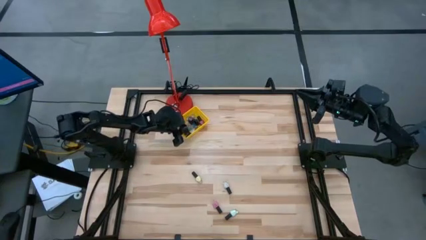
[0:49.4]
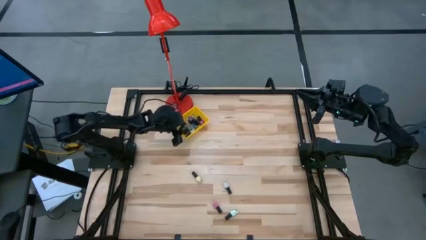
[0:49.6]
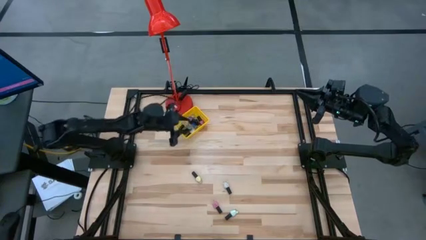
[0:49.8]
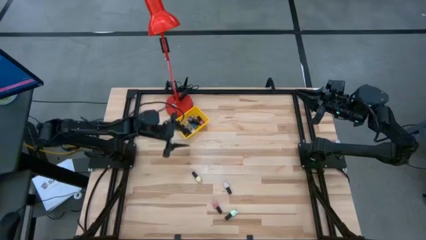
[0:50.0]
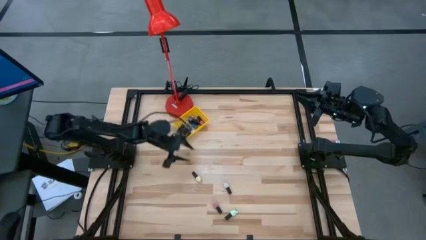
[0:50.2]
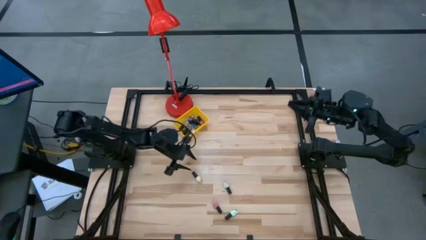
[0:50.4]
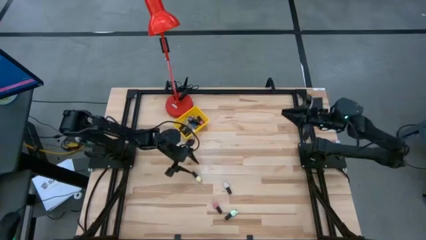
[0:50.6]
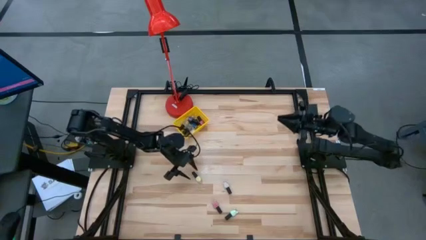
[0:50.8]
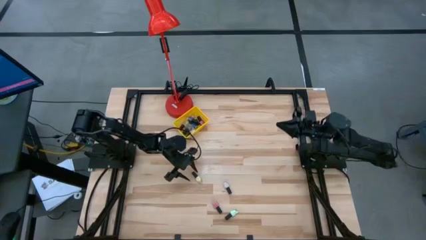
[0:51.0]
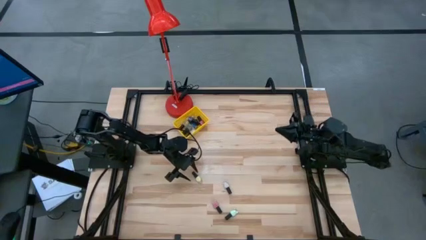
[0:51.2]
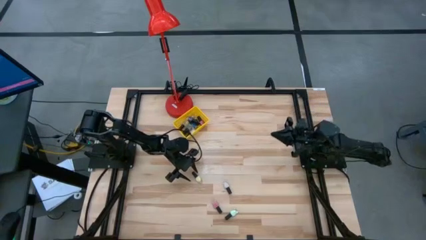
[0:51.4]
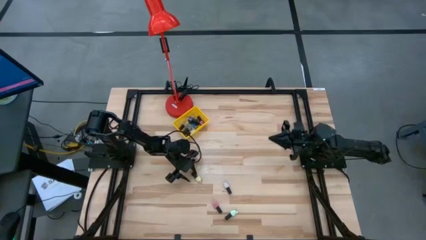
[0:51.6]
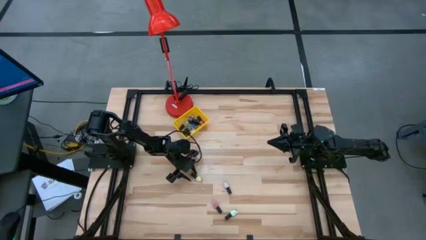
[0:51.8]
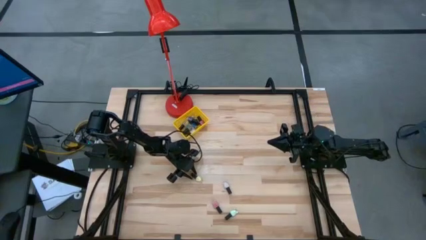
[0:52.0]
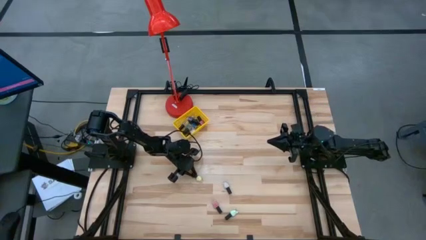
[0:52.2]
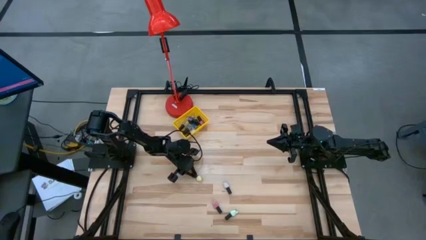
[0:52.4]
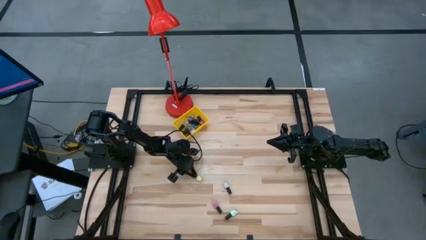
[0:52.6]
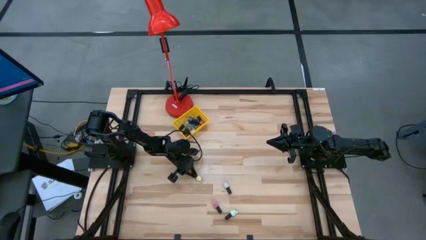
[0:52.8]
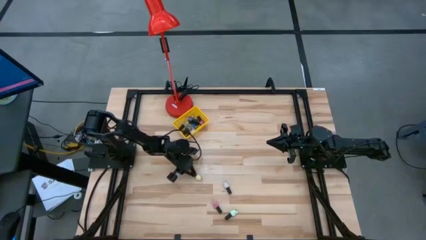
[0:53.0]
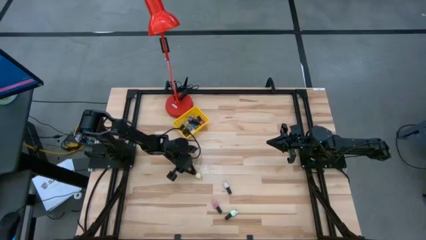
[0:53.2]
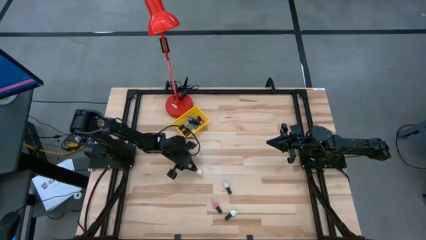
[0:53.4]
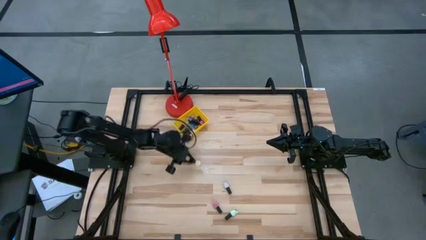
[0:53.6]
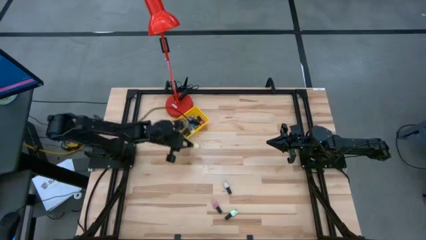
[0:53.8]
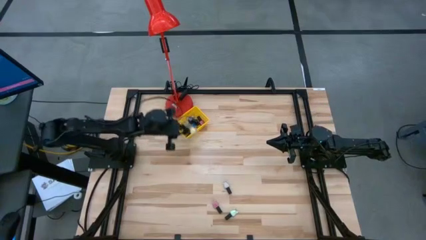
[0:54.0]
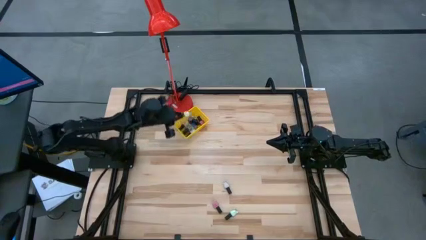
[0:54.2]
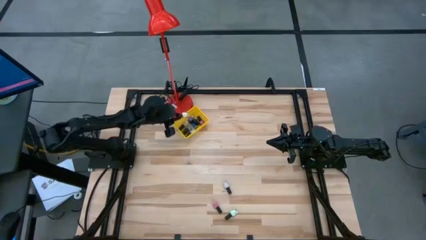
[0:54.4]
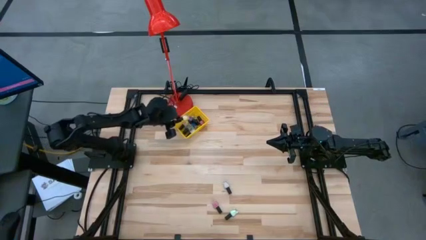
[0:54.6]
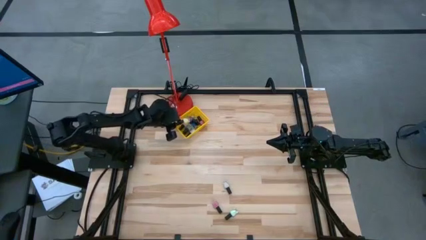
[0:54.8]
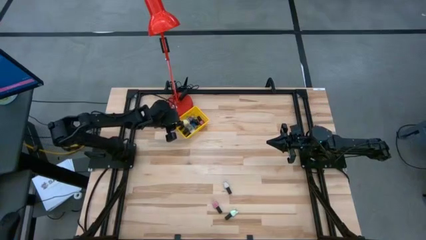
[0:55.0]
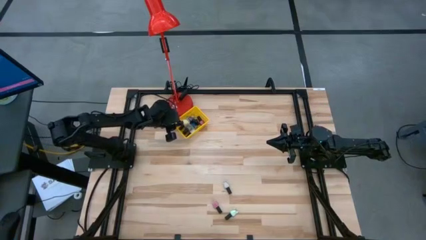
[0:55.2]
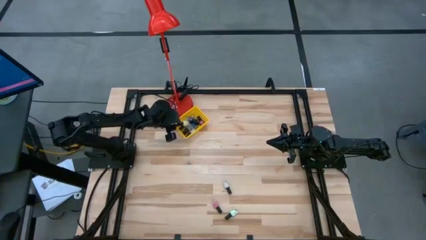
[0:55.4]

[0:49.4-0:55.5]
Task: Pick & Place Nail Polish
Put the yellow nail polish into the yellow basket

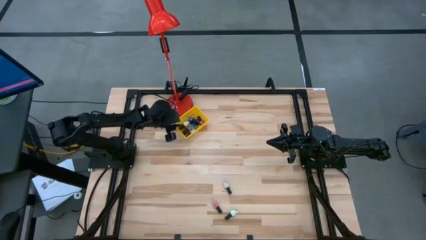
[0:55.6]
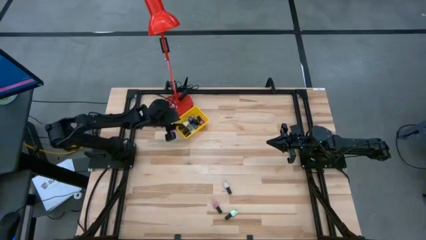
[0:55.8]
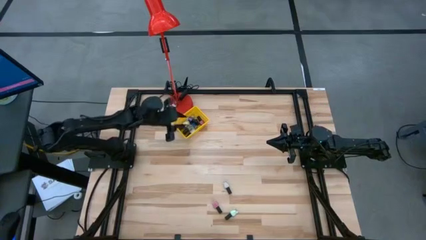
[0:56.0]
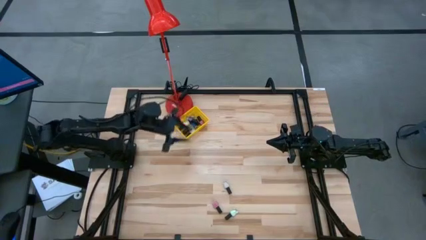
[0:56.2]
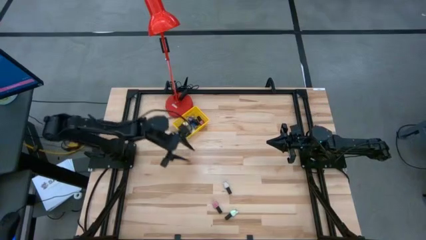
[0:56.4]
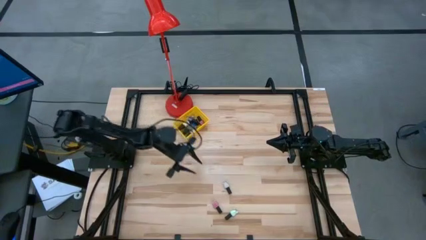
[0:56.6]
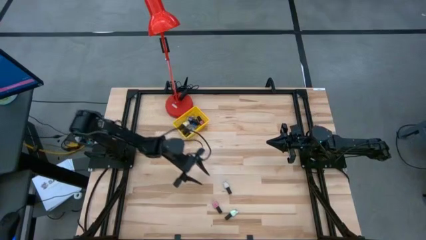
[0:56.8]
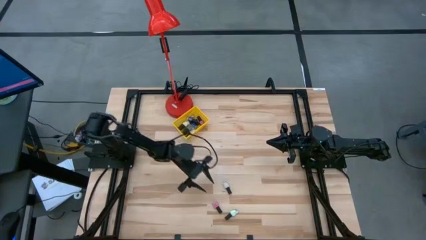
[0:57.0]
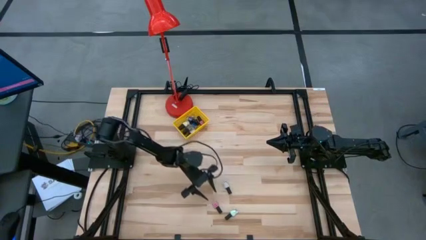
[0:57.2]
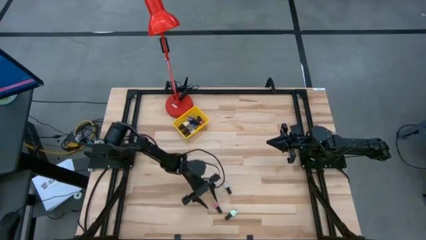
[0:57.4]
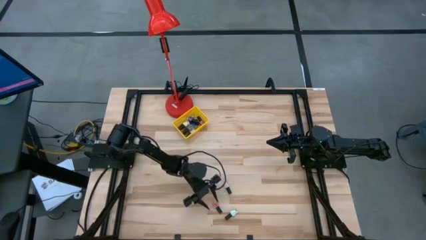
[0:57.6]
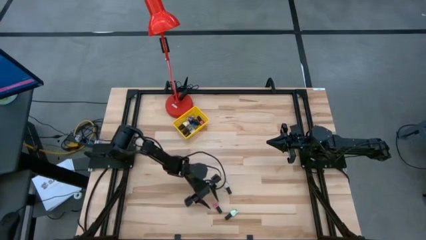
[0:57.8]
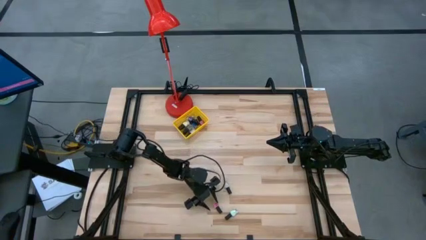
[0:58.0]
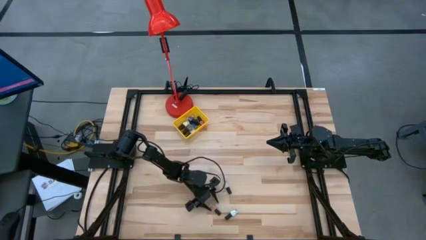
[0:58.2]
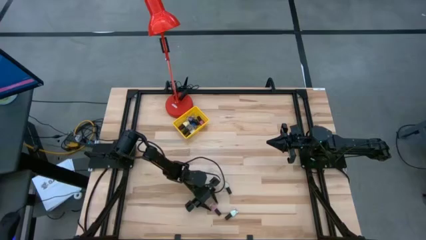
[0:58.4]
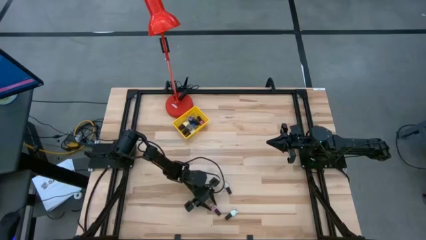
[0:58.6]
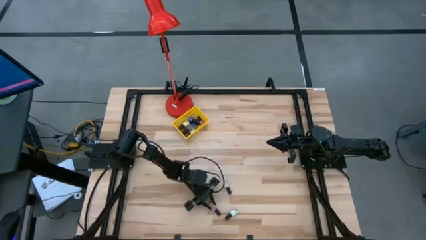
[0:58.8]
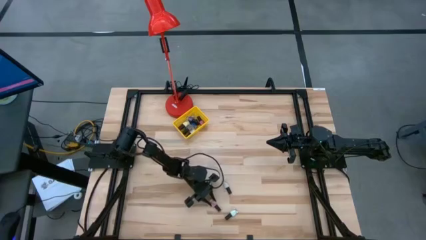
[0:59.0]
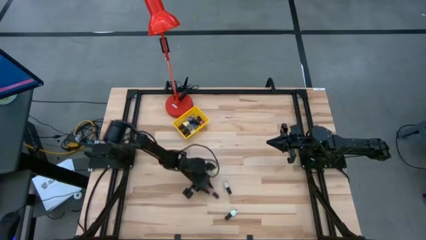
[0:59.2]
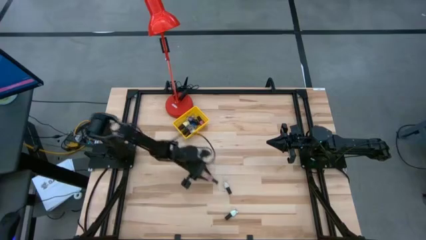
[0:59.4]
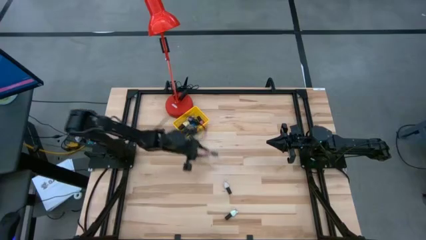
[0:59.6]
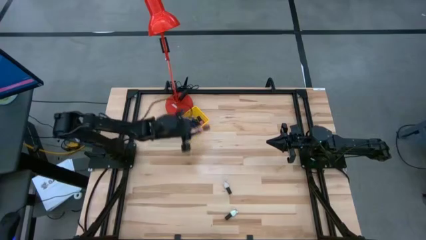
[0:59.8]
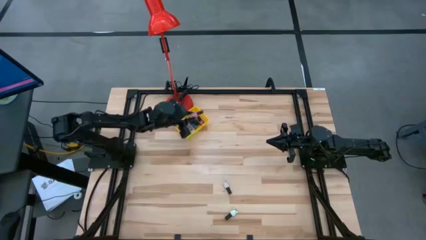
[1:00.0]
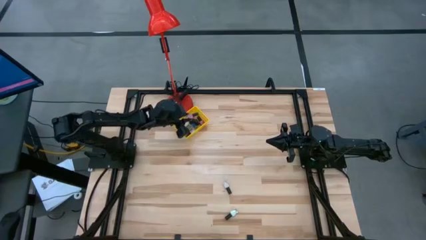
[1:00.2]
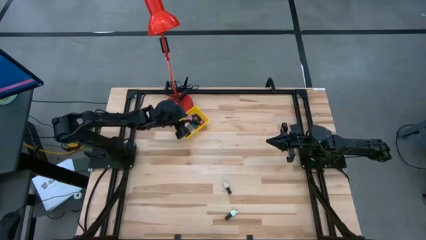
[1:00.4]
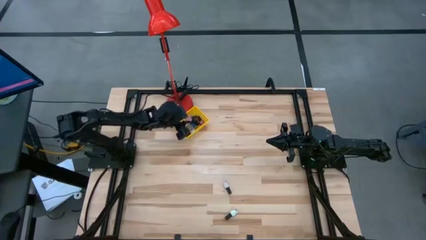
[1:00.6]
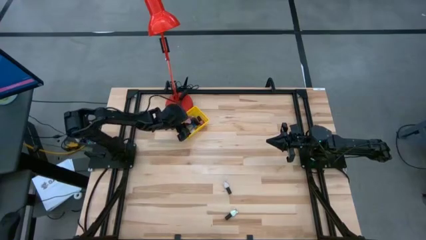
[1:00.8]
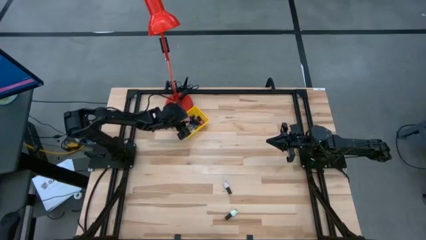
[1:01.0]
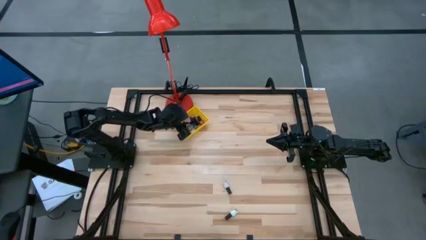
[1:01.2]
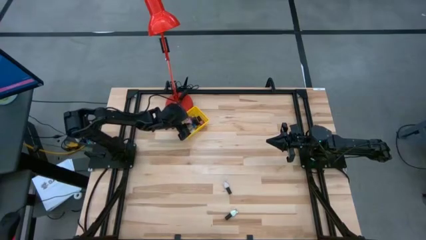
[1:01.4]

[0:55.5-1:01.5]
Put the pink nail polish into the yellow basket

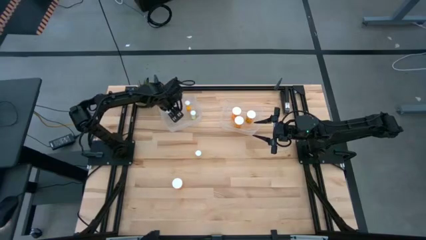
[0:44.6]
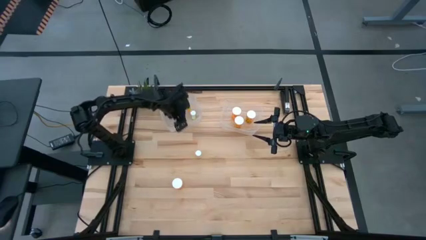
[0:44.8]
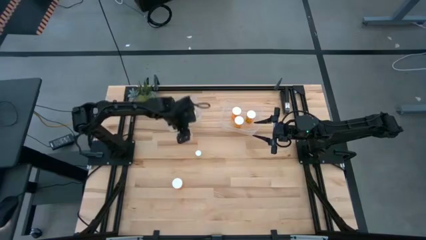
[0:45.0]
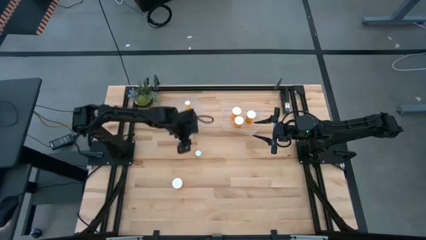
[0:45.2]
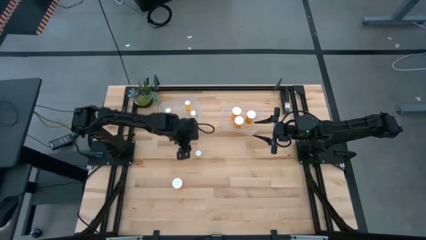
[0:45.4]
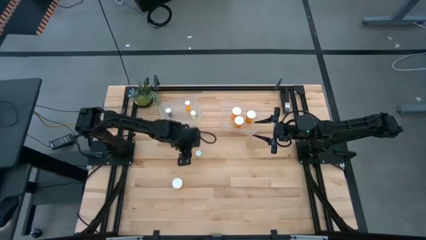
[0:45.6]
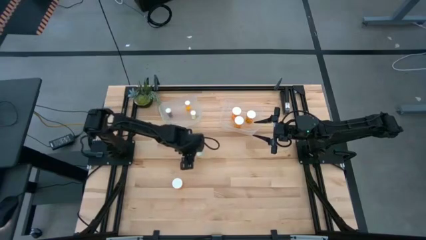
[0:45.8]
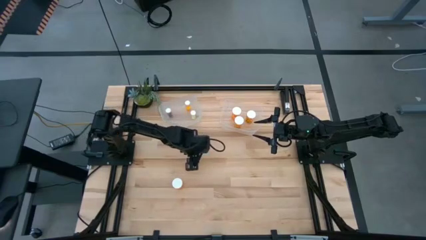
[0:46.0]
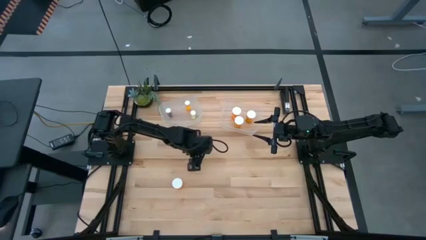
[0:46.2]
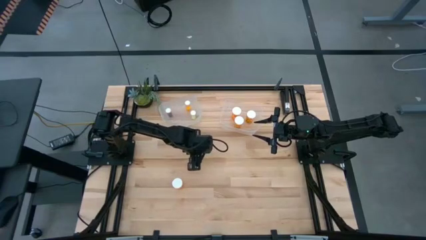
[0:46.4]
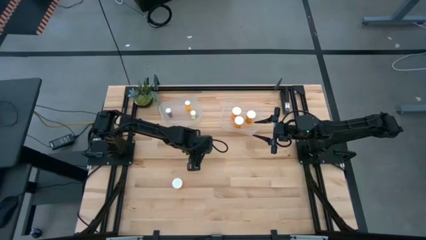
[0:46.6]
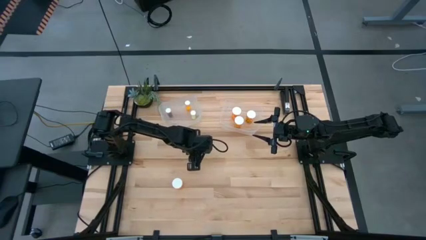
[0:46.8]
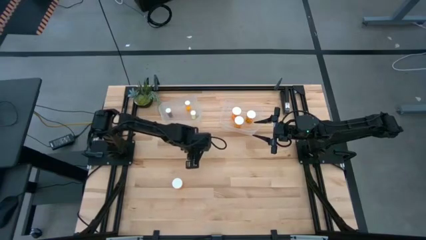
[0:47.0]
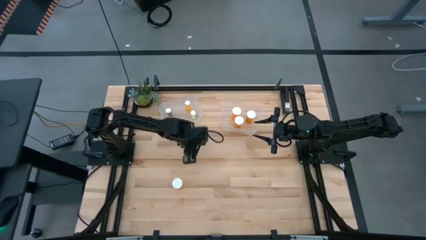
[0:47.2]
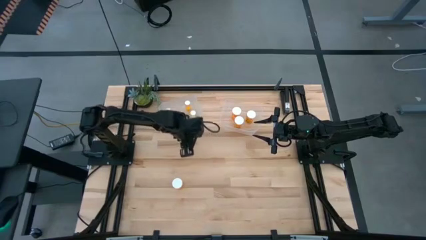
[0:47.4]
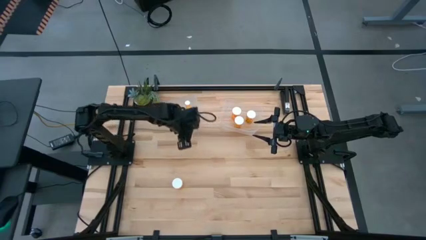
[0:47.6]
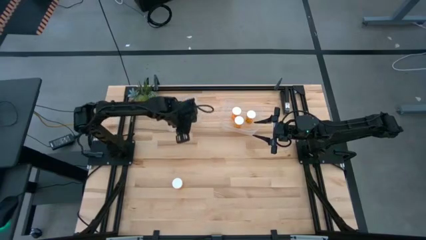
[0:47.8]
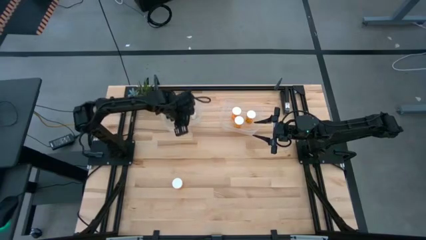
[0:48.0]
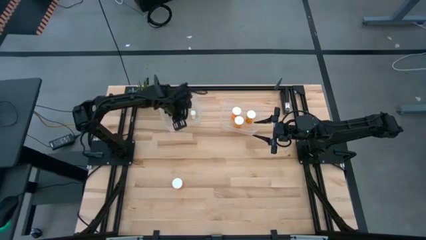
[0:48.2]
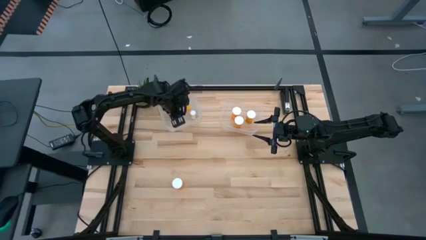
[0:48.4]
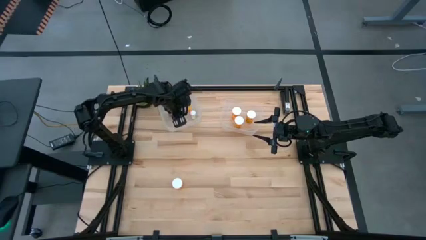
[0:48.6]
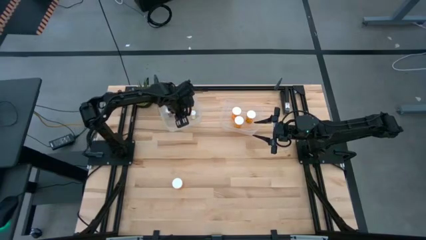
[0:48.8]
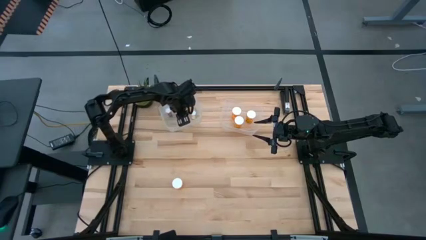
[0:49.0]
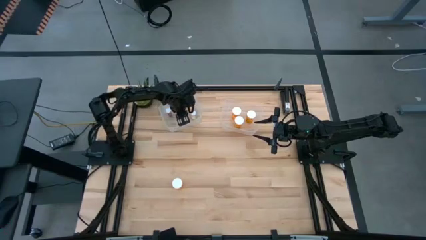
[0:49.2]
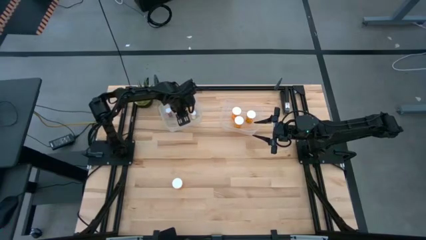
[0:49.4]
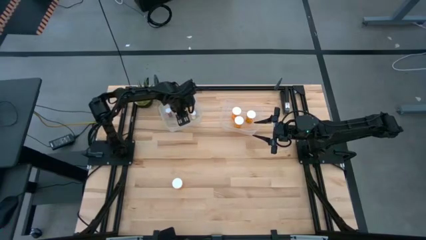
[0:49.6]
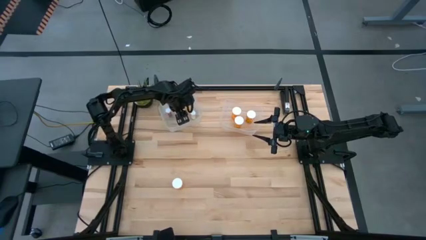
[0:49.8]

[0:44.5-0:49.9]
Task: Pick and place medicine bottles into bin by pill shape (circle, oval)
Put the yellow pill bottle into the left bin
